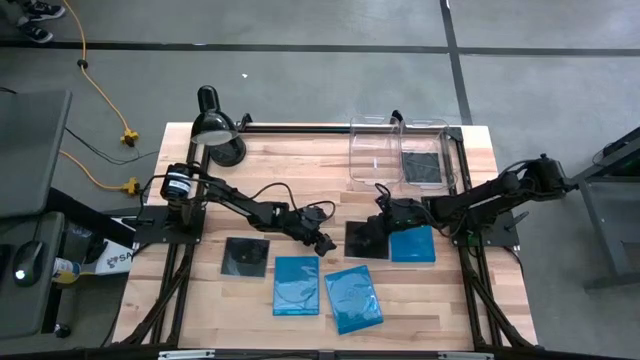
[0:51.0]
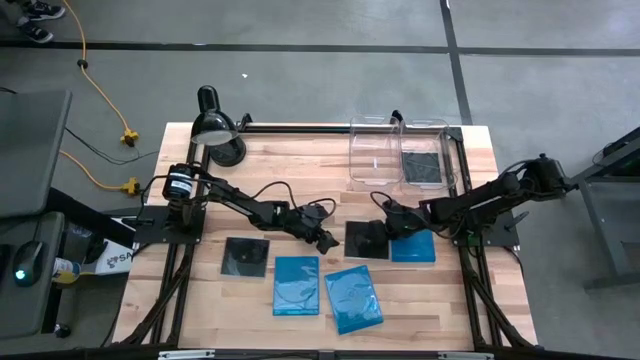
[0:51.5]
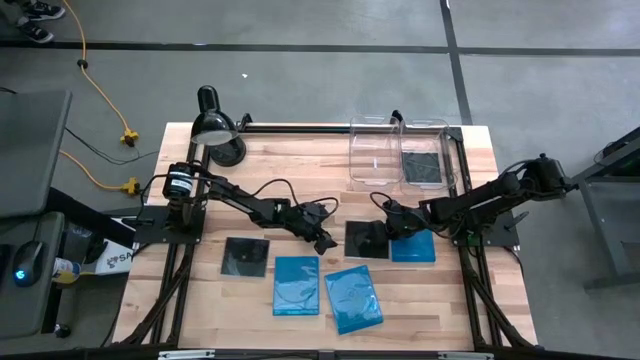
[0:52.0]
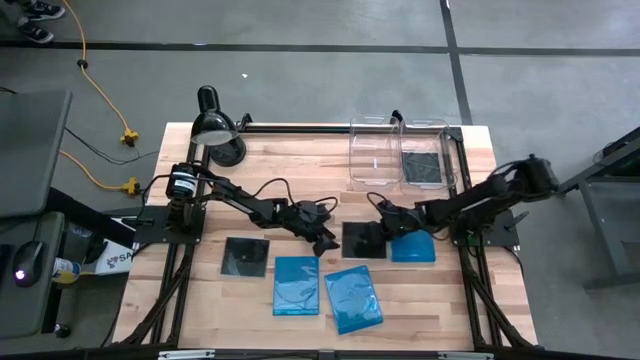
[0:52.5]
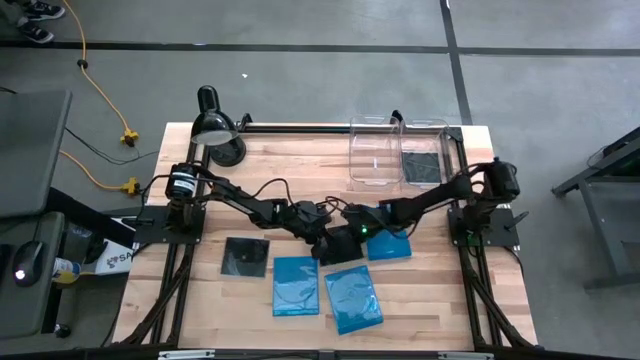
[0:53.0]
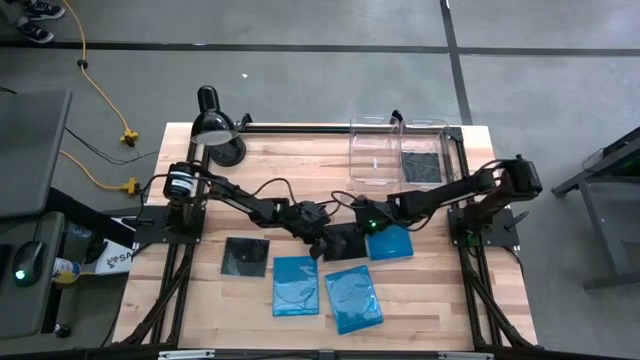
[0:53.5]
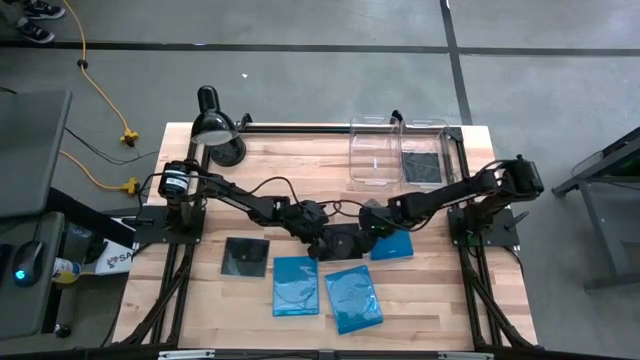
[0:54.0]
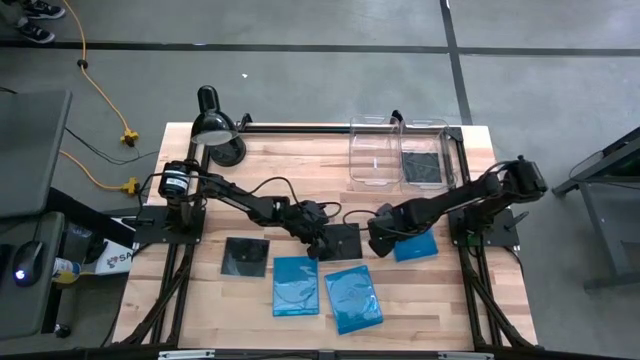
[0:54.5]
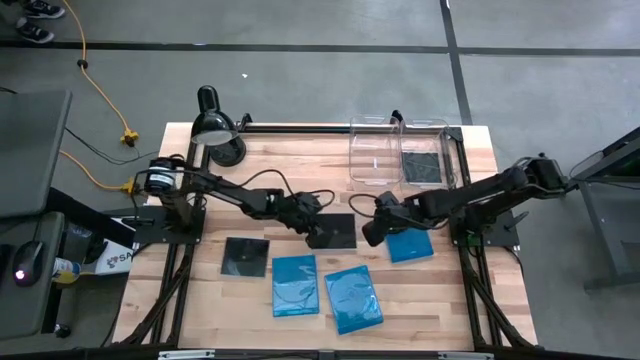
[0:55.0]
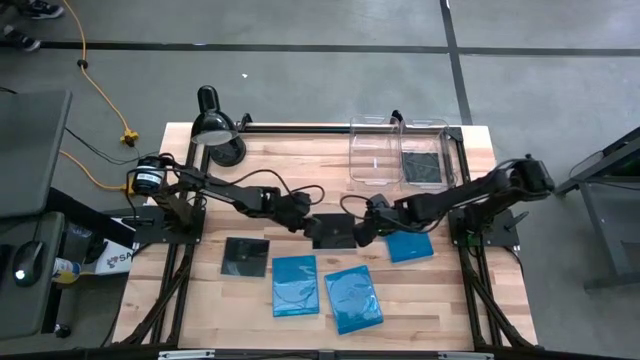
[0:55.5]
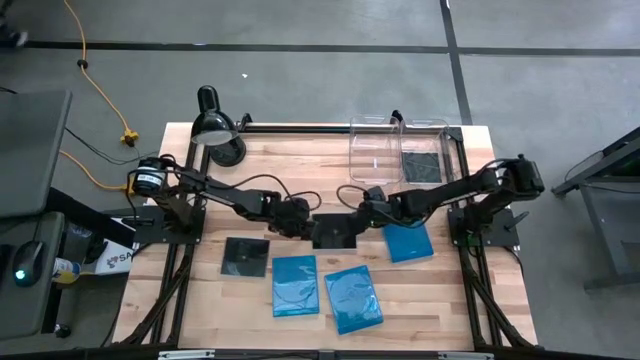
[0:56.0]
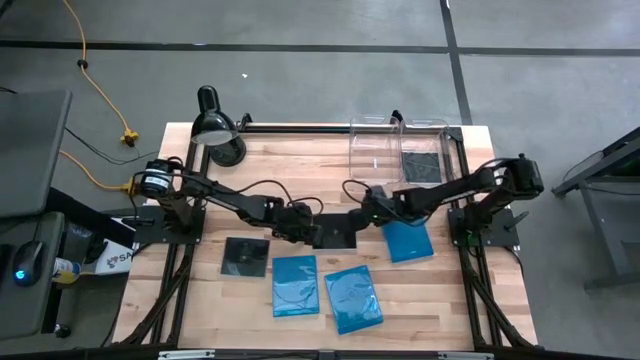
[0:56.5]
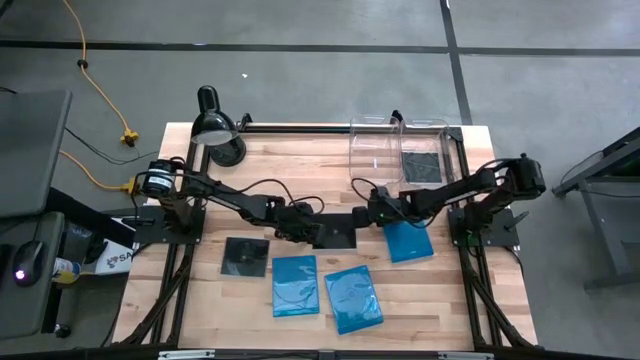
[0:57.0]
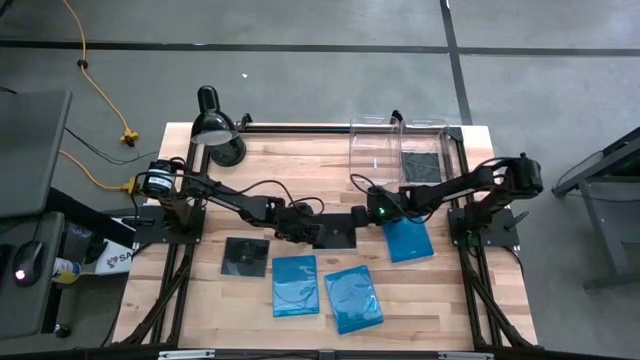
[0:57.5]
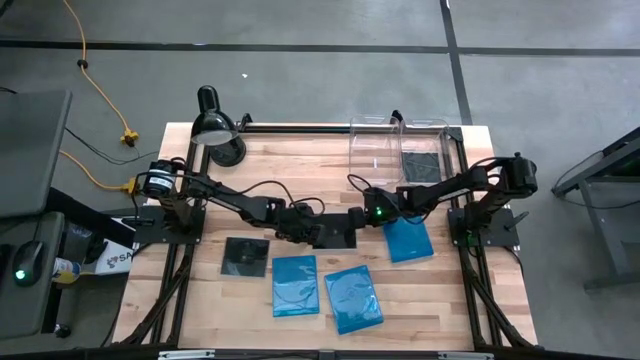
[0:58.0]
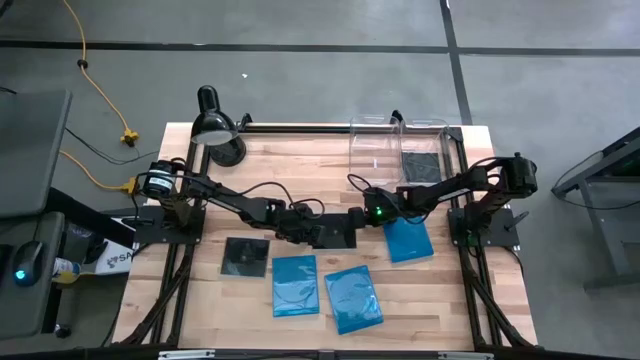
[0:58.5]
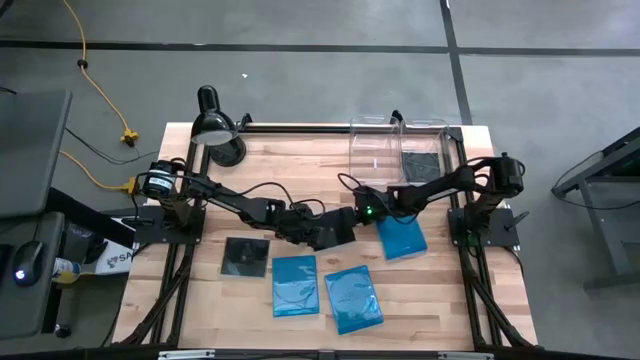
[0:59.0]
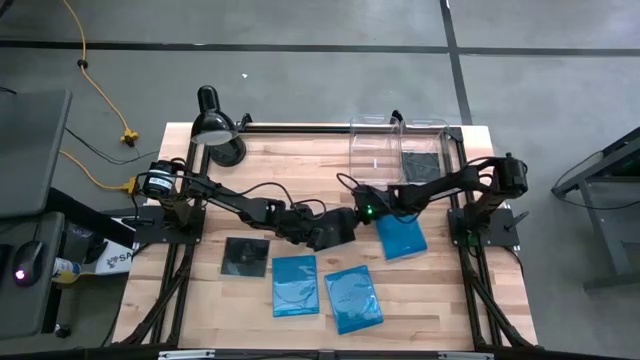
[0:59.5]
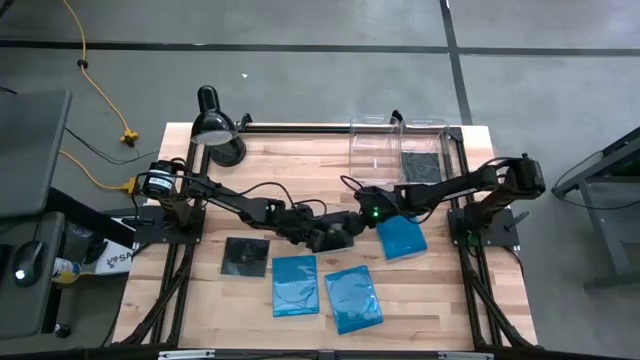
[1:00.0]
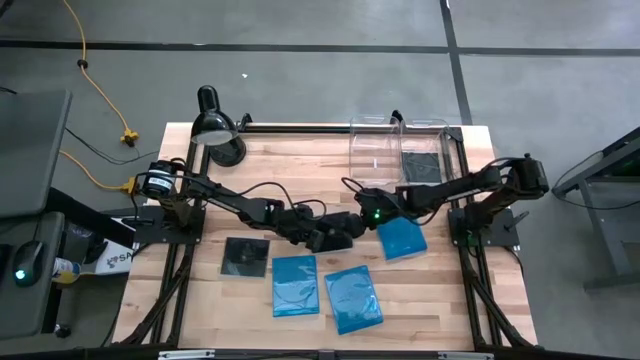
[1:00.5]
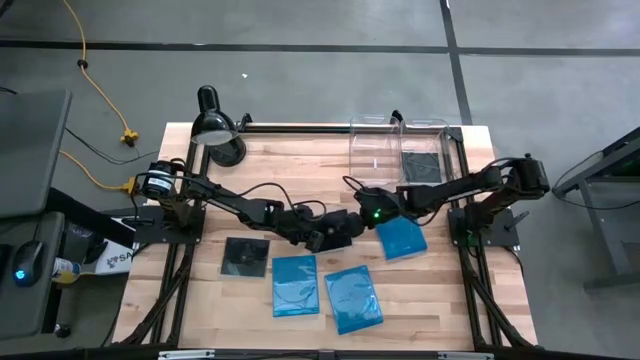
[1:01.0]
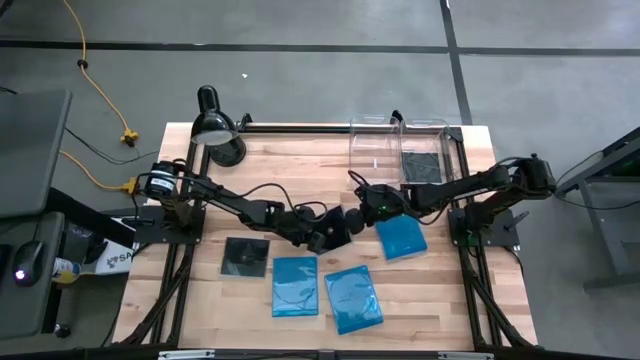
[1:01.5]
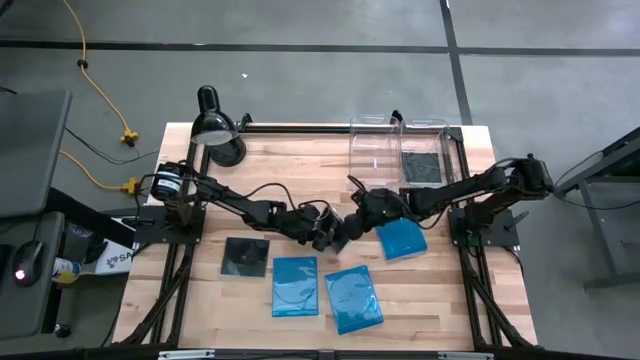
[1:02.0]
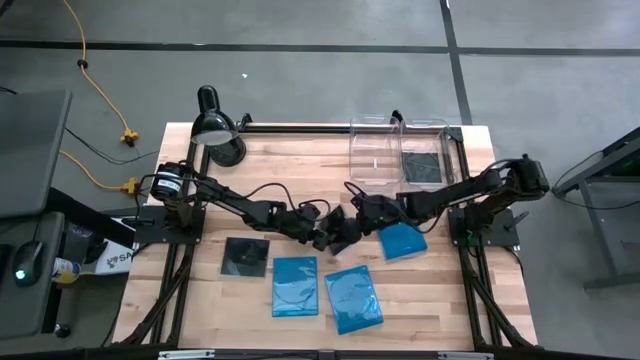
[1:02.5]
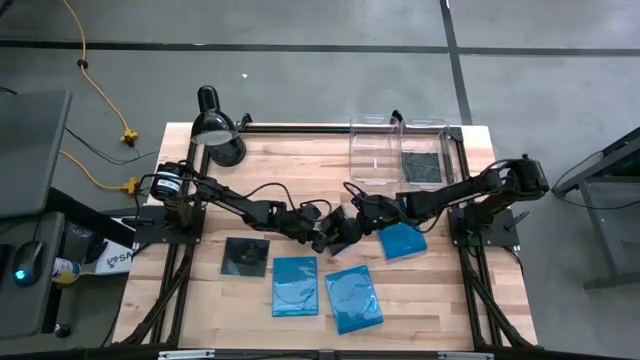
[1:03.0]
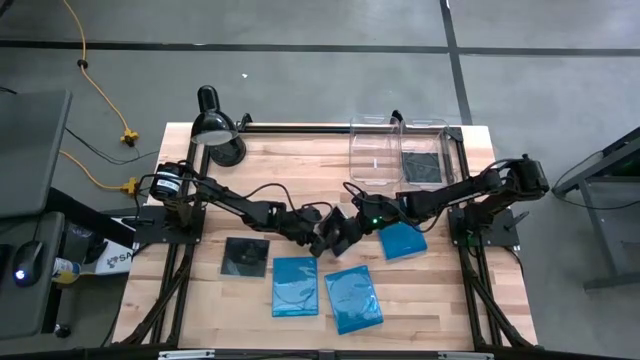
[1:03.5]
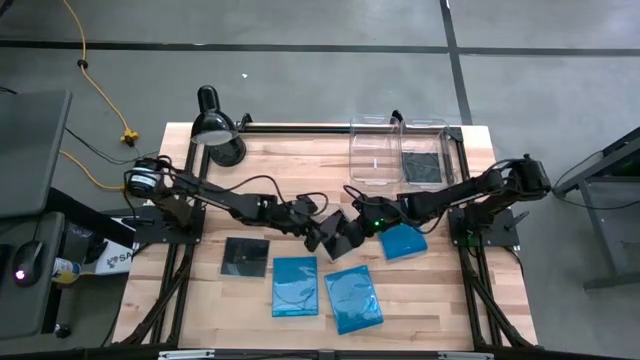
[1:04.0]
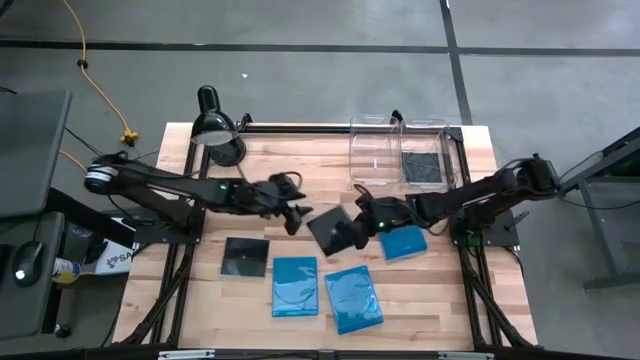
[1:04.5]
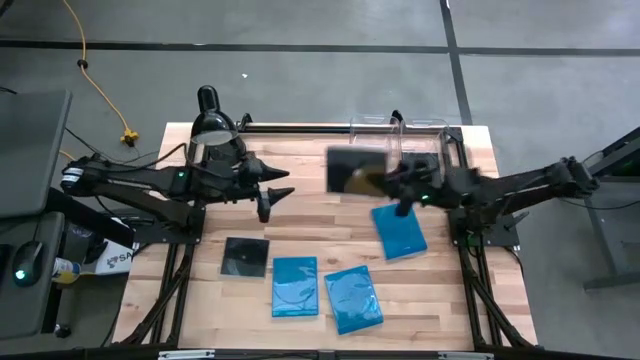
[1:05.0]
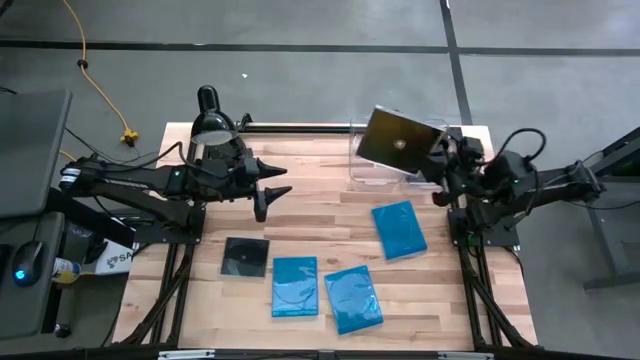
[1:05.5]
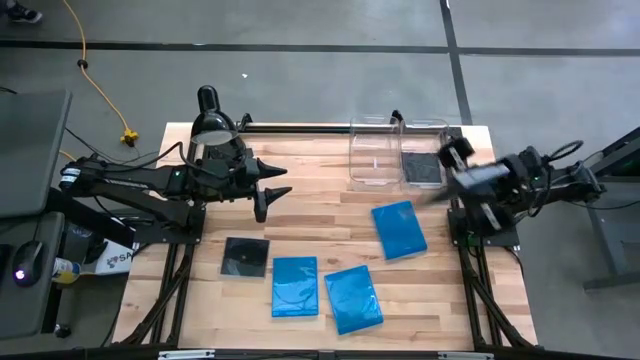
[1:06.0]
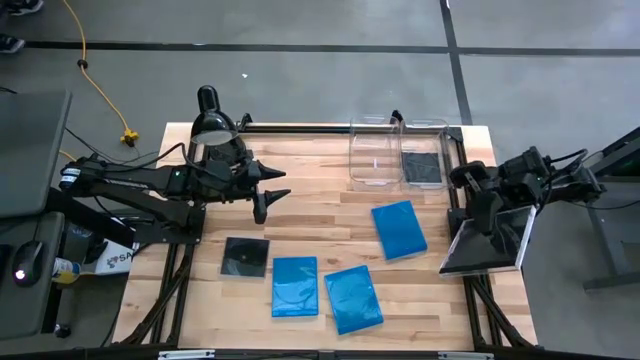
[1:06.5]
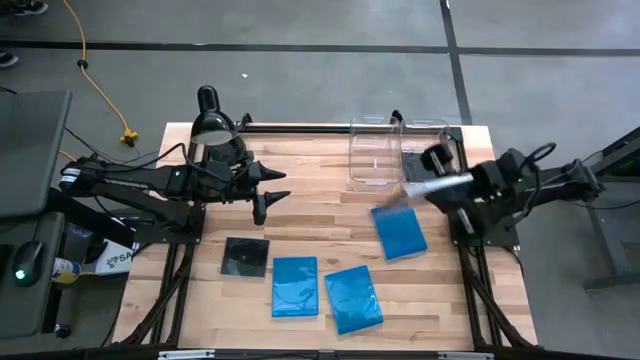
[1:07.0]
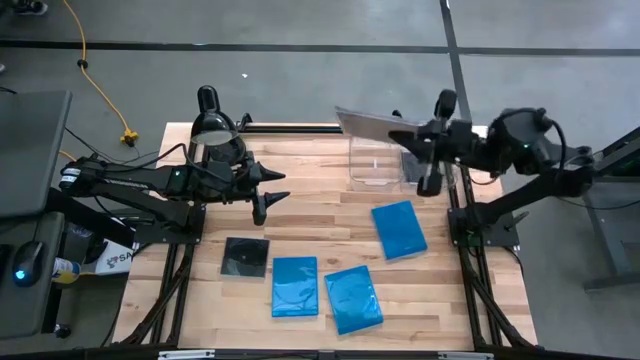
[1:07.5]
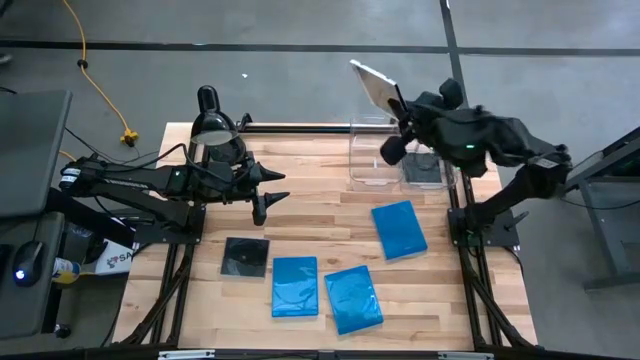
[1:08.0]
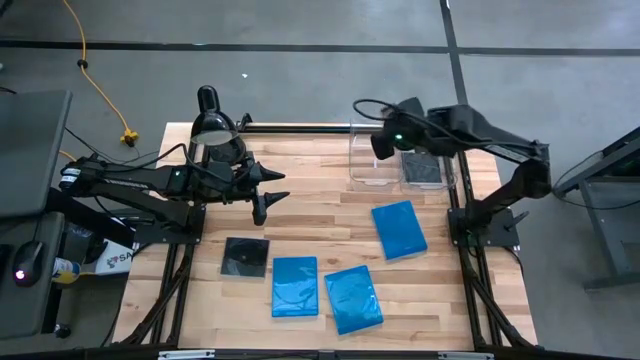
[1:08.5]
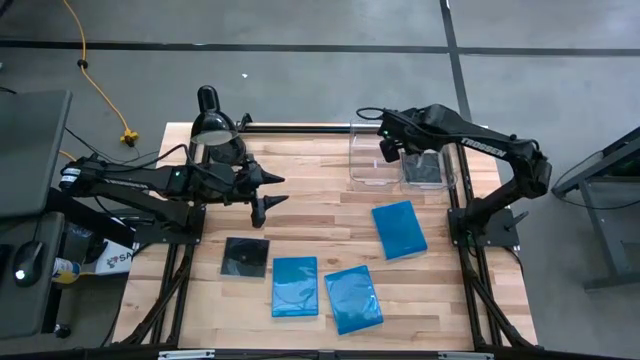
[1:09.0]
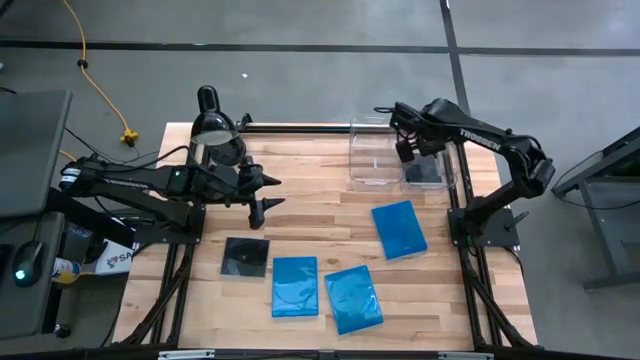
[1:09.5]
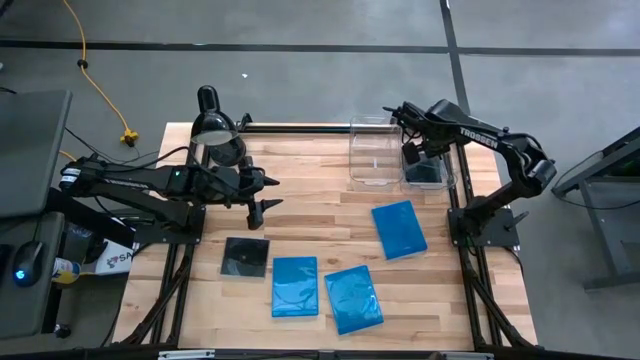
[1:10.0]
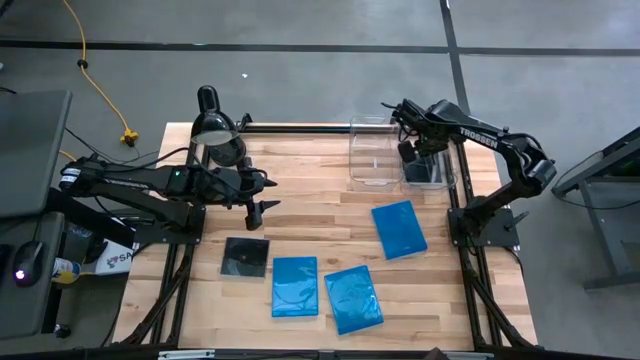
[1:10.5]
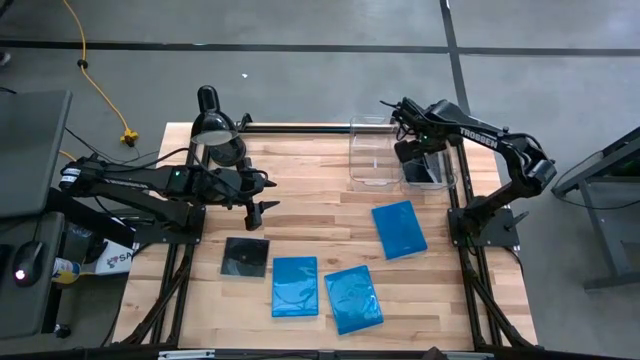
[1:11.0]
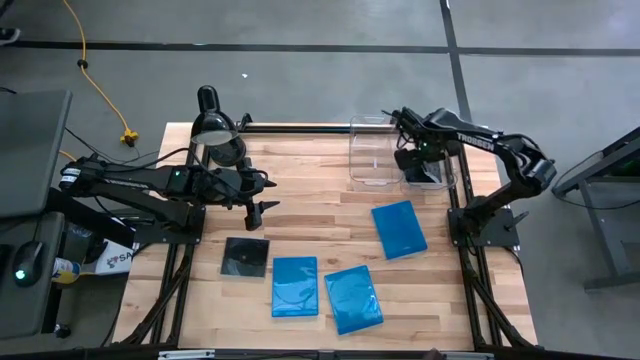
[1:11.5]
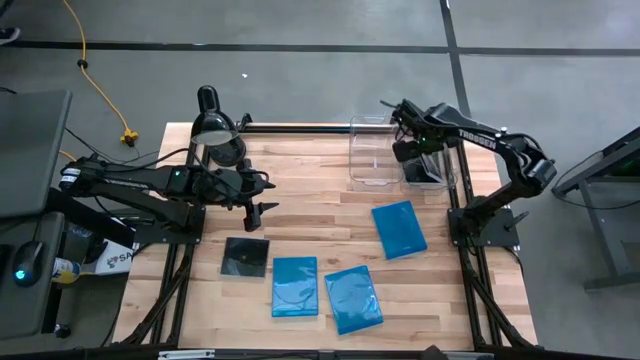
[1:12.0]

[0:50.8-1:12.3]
Task: Pick & place jewel cases by type
Put the right black CD case into the right transparent bin
